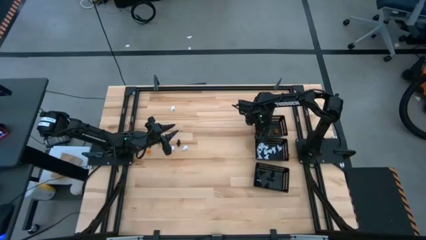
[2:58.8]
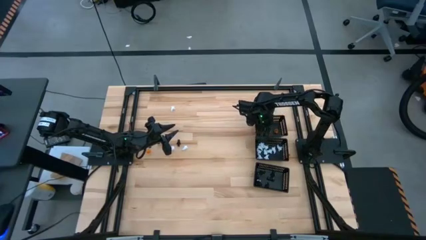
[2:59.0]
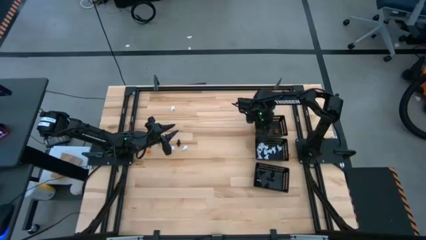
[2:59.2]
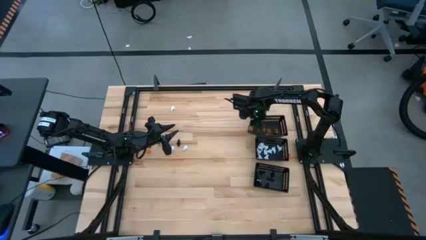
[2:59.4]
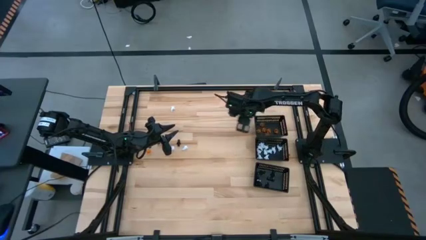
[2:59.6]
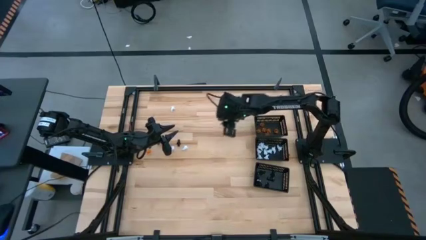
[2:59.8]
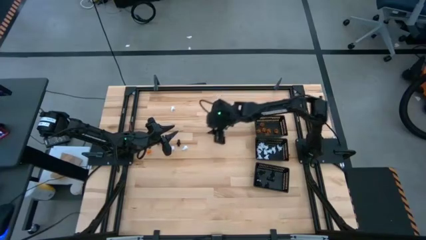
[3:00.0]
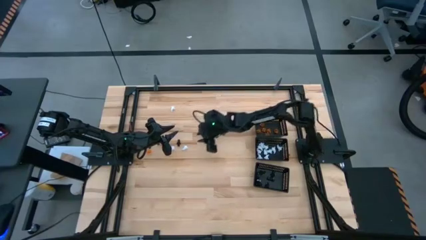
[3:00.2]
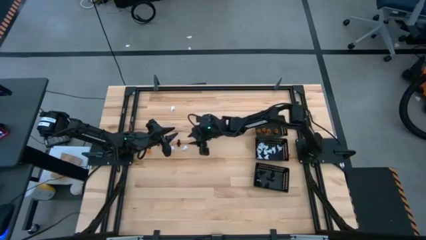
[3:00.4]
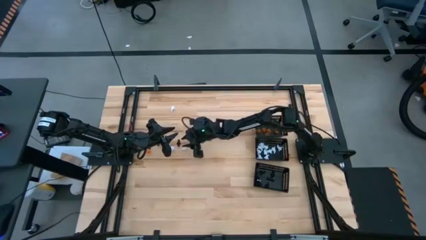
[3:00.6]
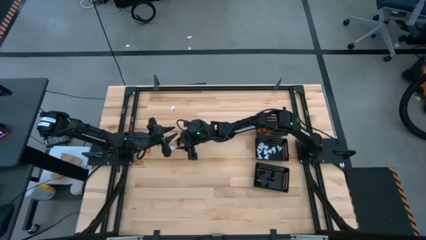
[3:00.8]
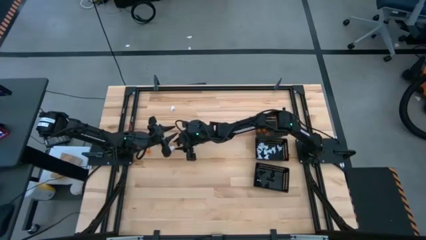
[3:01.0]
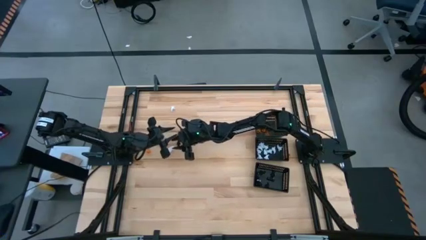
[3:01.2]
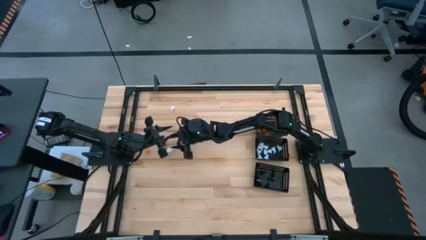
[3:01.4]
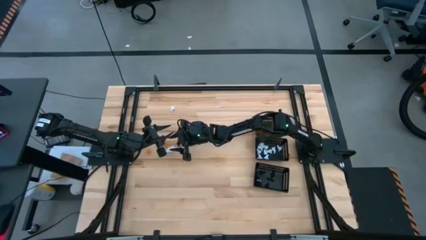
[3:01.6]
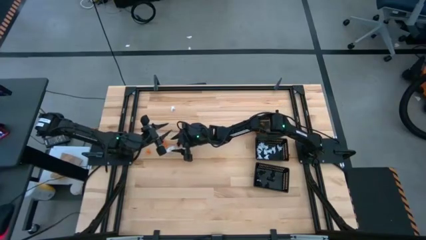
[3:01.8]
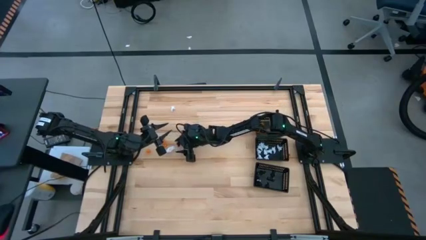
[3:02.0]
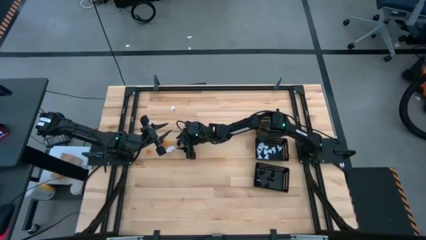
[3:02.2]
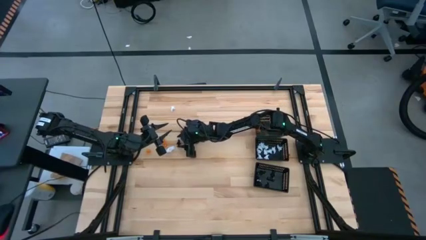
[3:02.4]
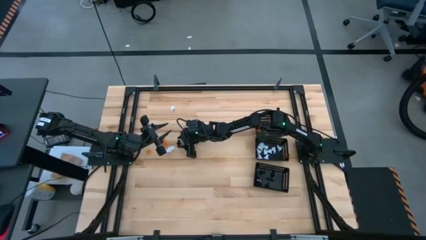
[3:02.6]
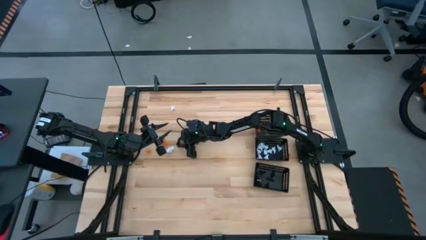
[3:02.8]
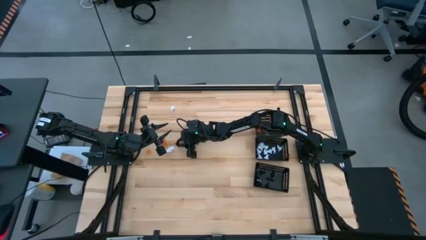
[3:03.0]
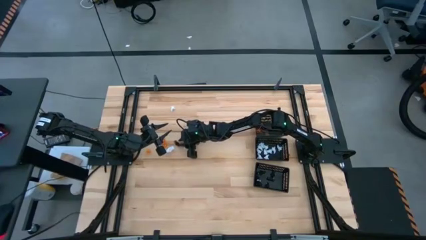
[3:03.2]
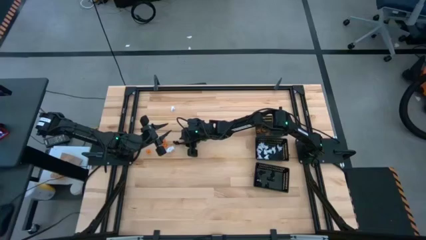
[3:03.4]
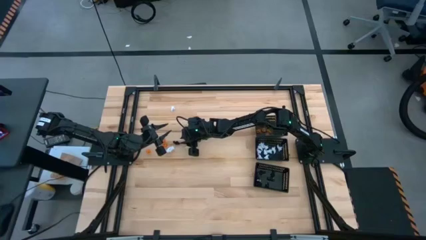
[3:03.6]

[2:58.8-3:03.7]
Task: Sort Halloween decoration
Put the black skeleton toy into the bottom black bin

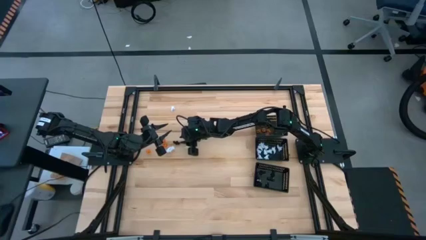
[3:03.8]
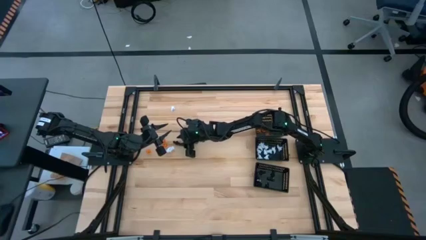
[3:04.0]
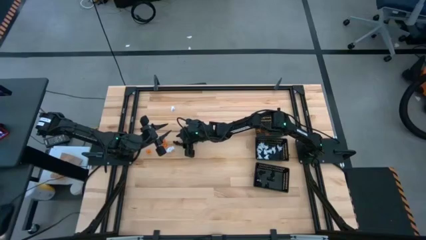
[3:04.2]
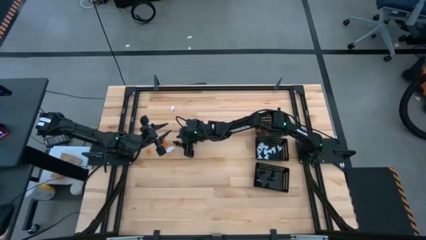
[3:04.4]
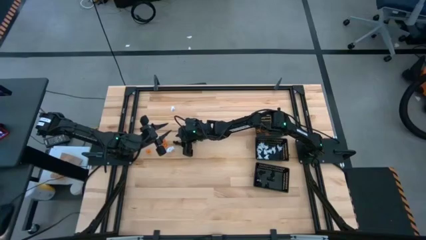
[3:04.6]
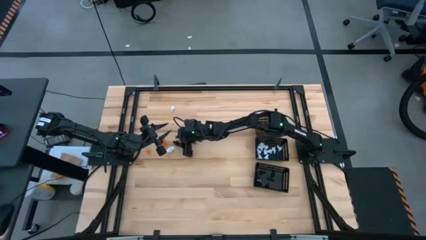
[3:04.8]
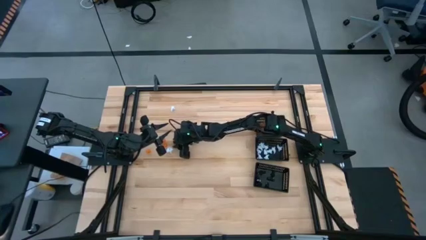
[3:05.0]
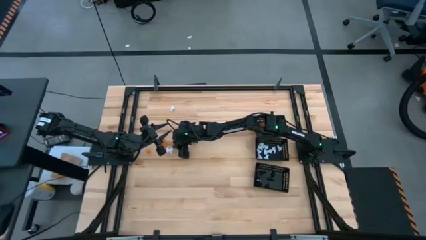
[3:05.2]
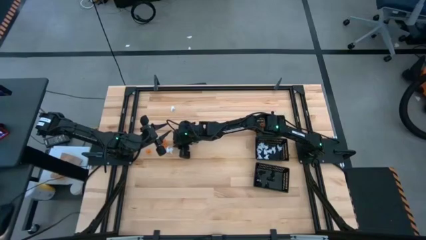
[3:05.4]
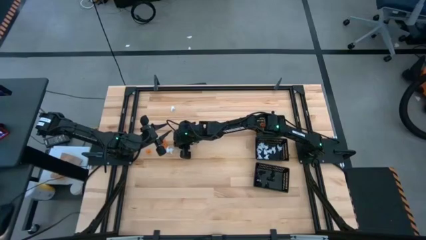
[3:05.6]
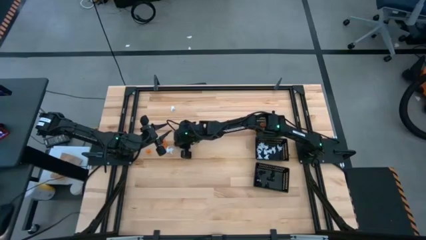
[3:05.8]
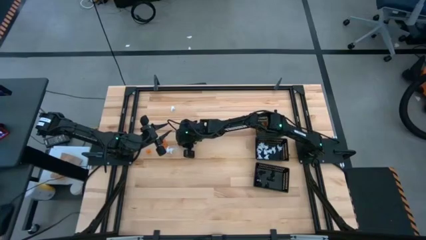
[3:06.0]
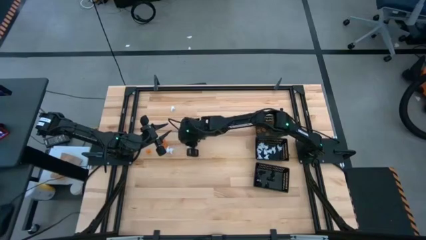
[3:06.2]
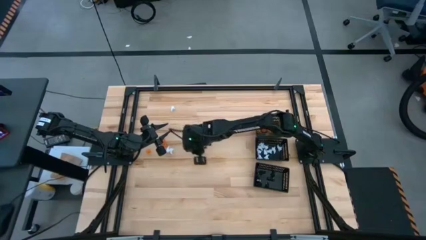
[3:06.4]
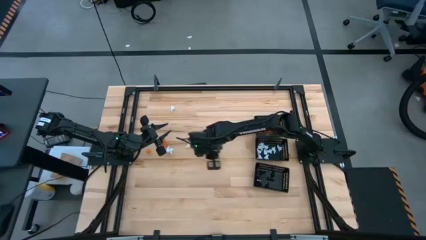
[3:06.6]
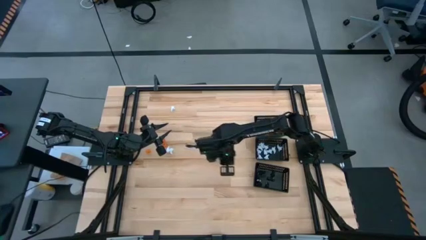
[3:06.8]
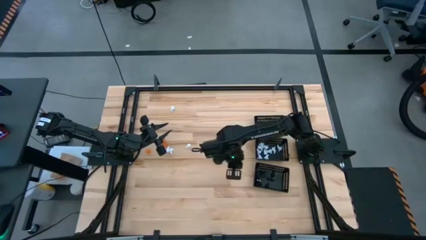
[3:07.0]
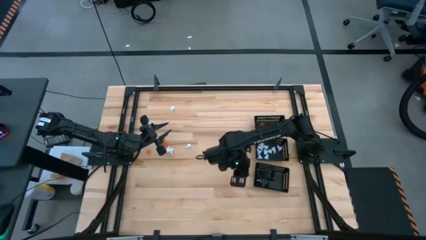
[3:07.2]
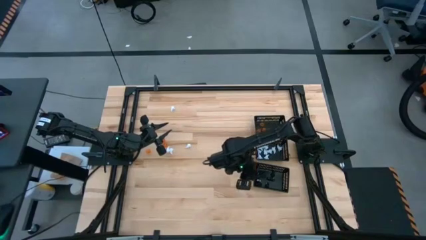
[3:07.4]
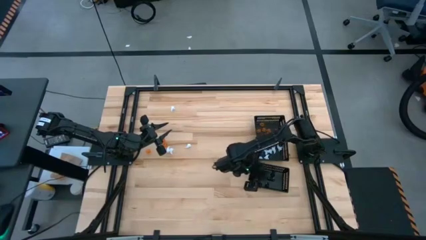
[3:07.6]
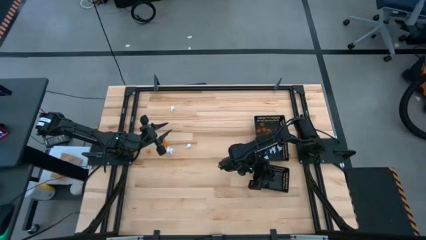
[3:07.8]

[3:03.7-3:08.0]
Put the black skeleton toy into the bottom black bin

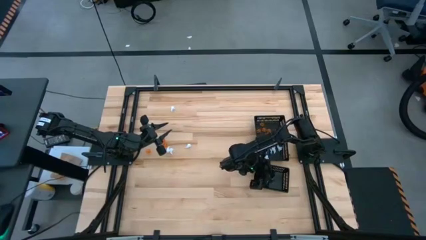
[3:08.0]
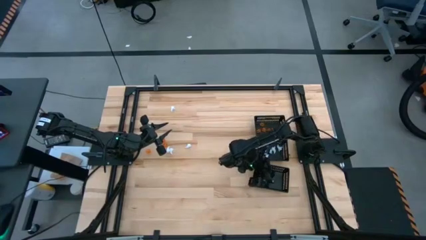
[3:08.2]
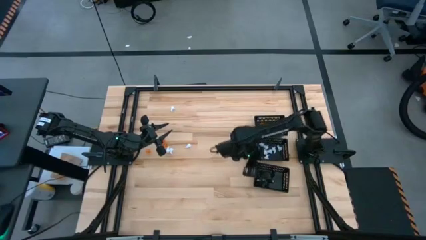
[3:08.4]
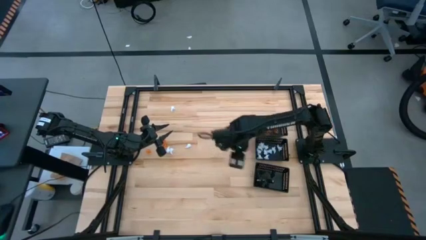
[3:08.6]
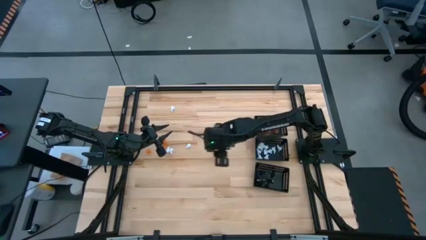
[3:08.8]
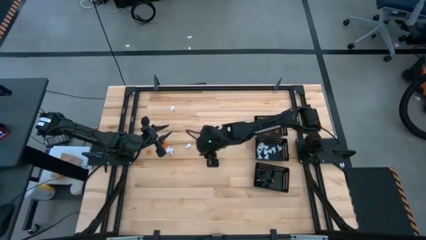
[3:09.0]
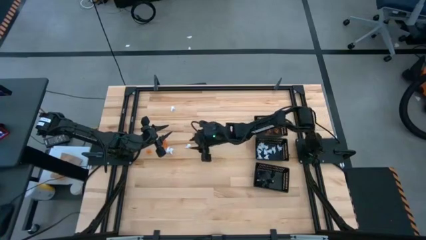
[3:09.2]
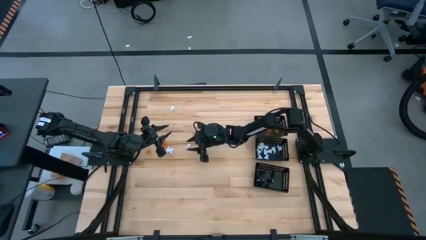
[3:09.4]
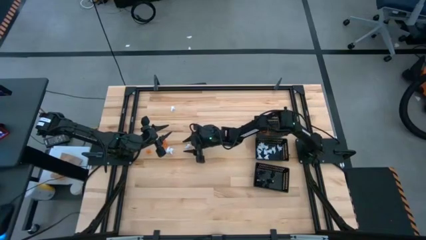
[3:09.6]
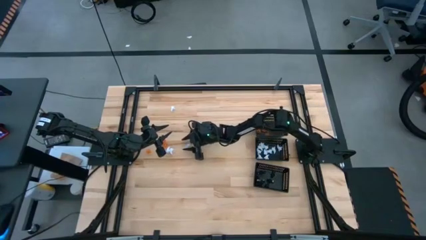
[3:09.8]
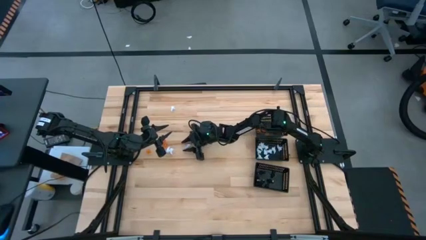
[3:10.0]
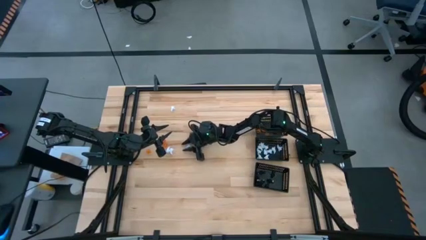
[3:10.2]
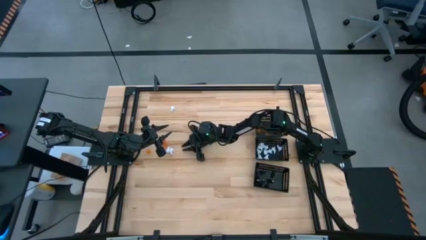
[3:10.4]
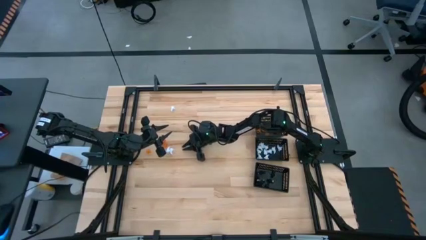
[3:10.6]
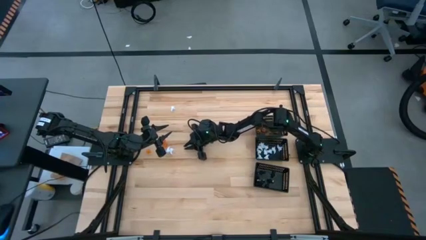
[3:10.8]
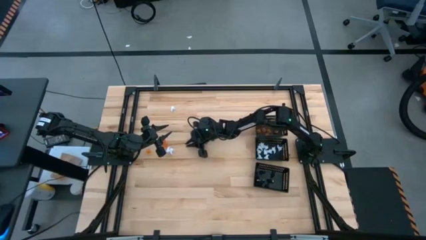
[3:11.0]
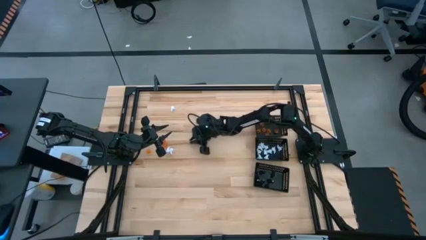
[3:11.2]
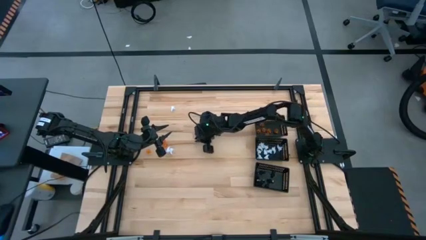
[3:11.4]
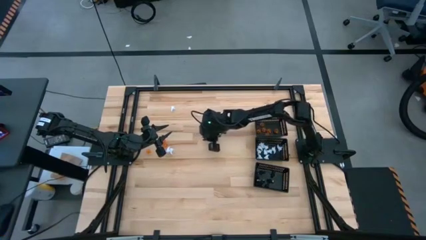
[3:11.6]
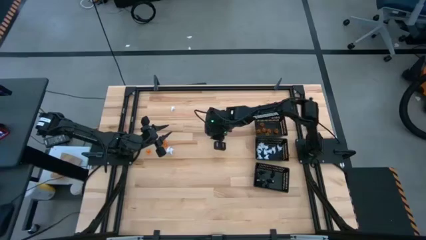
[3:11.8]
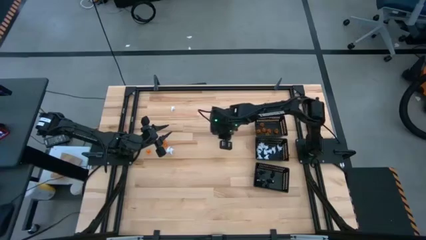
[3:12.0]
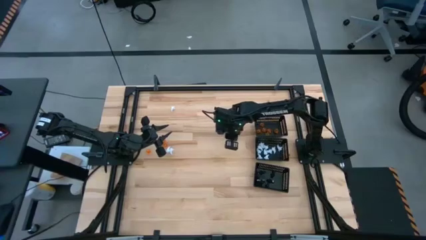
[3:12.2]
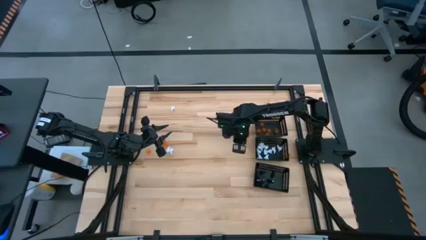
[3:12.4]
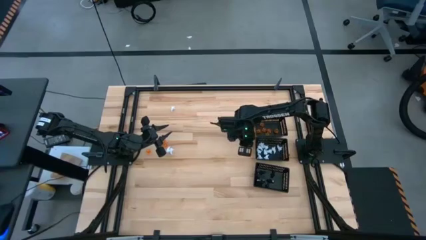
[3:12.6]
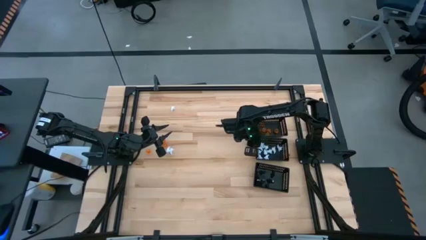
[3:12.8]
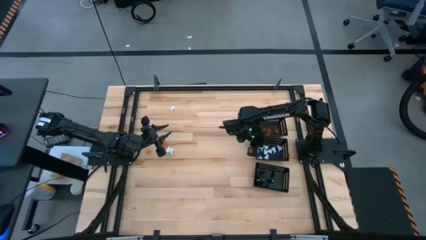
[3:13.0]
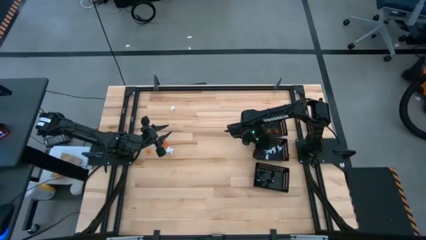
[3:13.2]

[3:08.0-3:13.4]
Put the white ghost toy into the center black bin

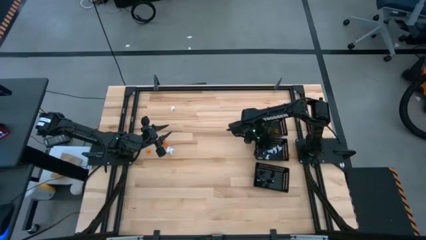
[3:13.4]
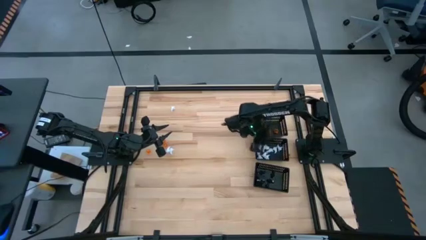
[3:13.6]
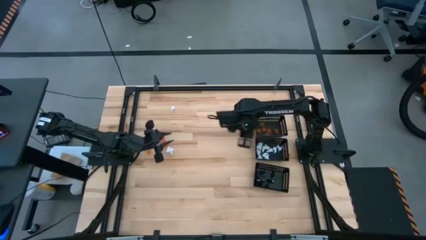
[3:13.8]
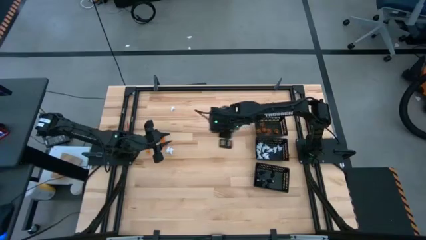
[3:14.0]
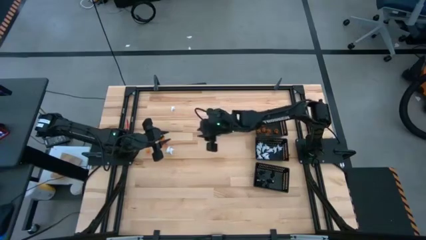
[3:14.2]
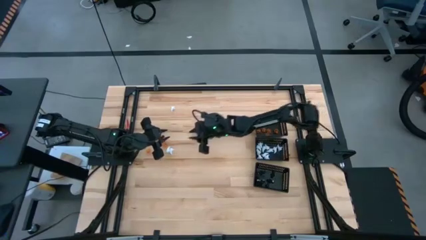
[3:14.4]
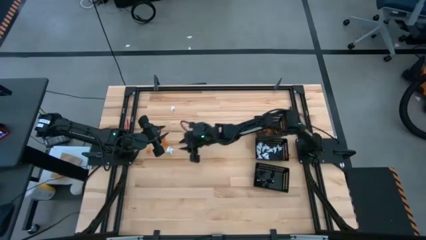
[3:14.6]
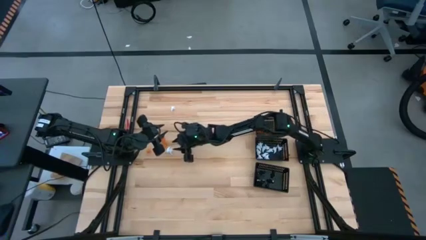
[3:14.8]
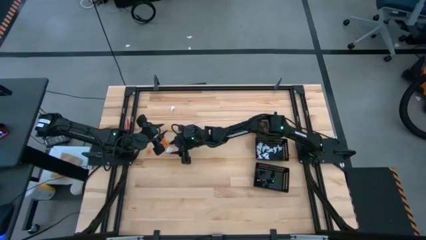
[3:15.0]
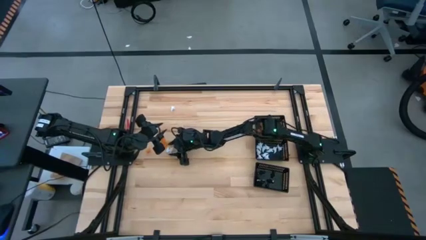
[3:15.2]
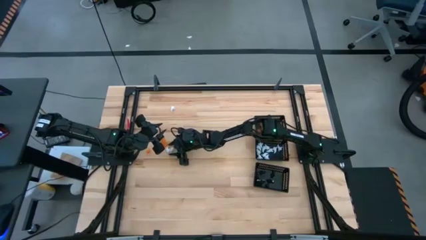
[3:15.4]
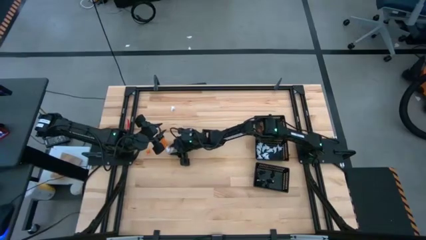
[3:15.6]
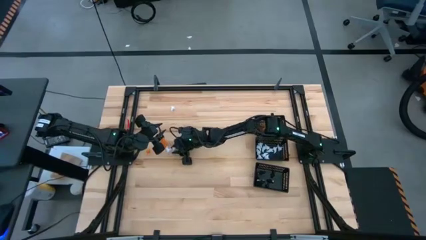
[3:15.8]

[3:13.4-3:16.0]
Put the white ghost toy into the center black bin
